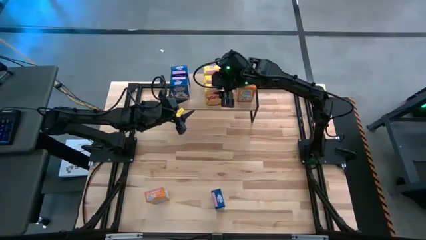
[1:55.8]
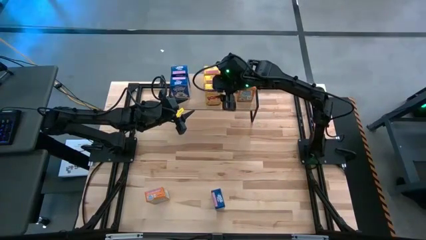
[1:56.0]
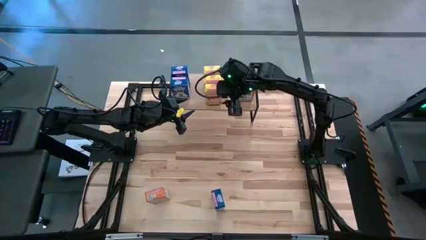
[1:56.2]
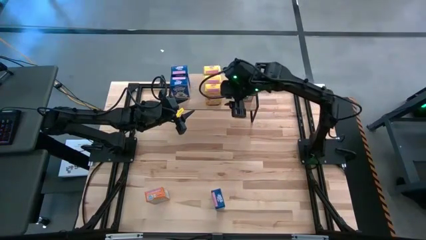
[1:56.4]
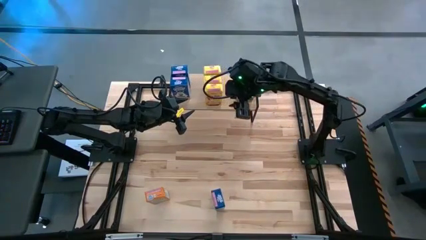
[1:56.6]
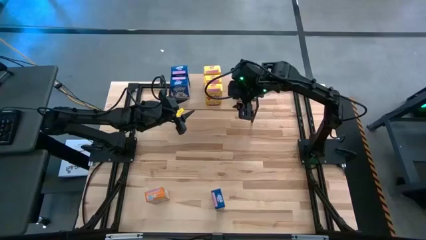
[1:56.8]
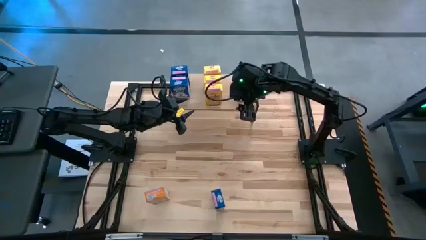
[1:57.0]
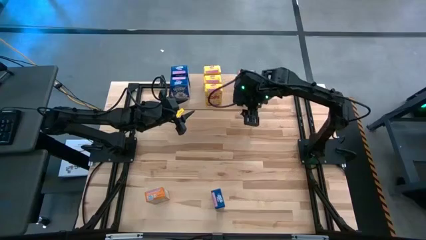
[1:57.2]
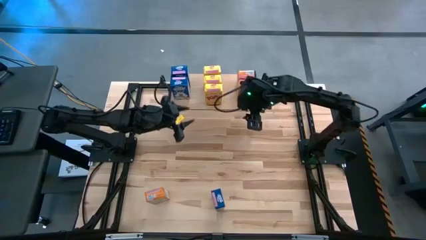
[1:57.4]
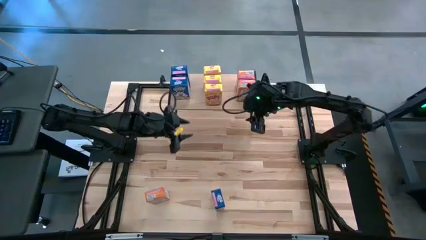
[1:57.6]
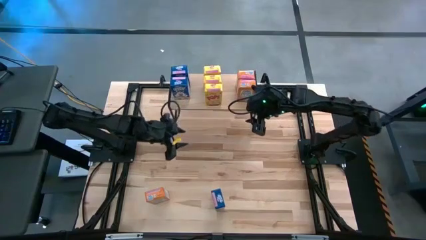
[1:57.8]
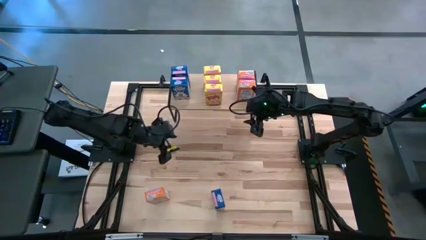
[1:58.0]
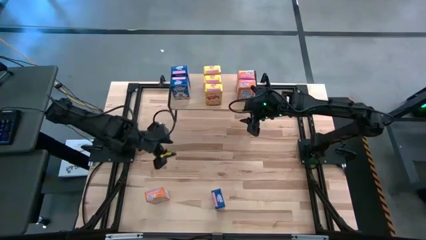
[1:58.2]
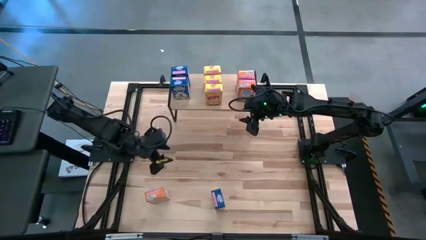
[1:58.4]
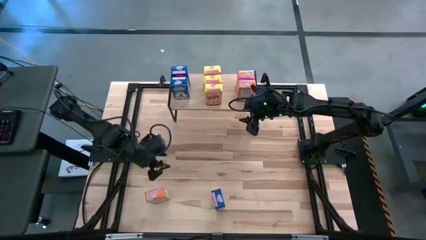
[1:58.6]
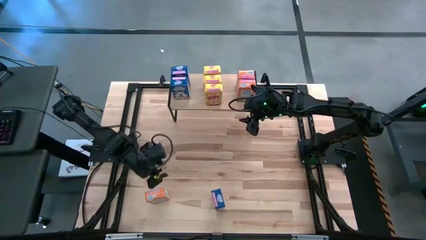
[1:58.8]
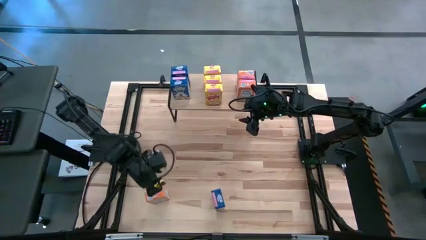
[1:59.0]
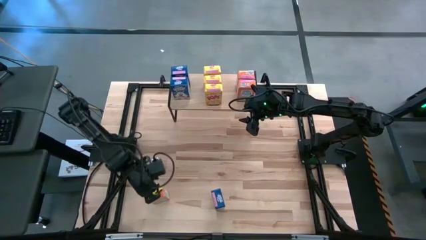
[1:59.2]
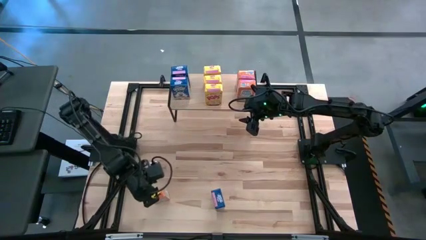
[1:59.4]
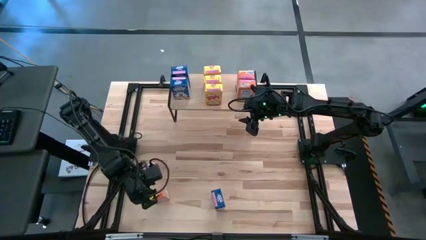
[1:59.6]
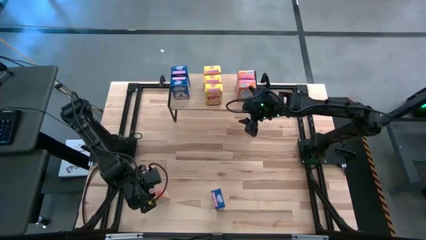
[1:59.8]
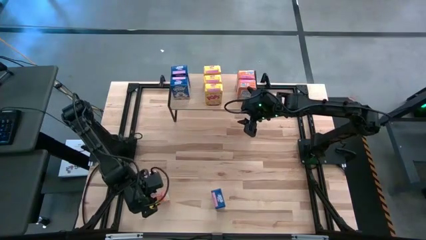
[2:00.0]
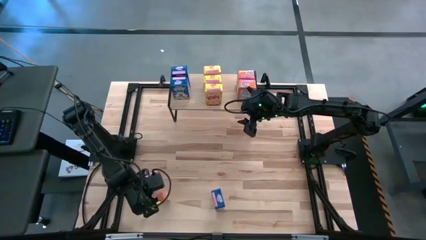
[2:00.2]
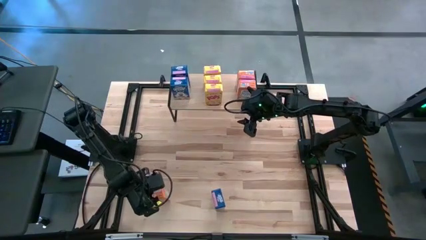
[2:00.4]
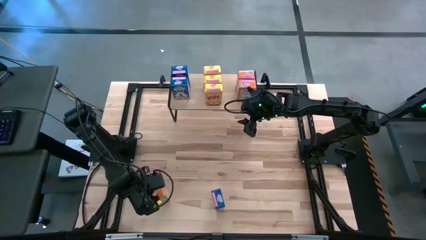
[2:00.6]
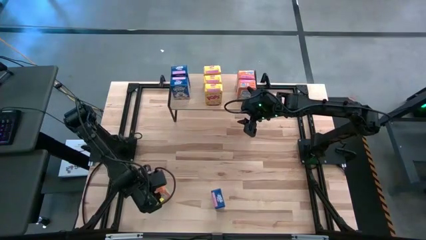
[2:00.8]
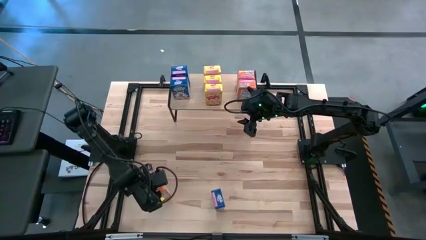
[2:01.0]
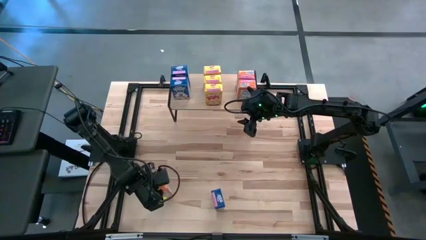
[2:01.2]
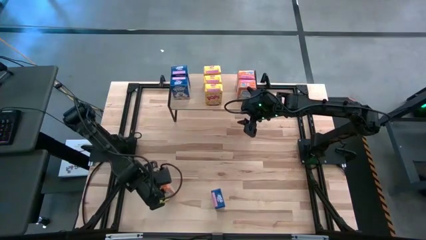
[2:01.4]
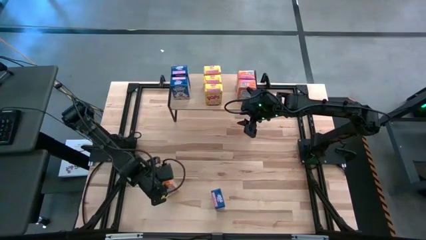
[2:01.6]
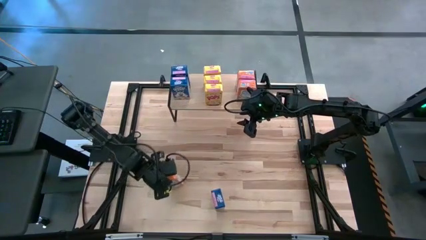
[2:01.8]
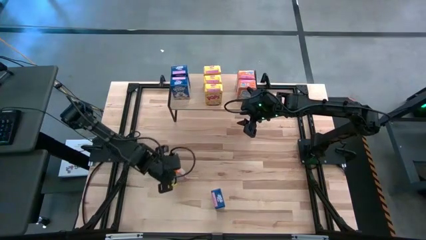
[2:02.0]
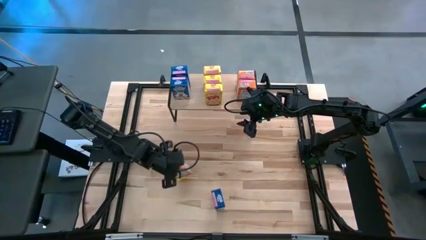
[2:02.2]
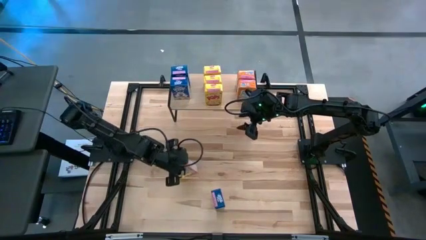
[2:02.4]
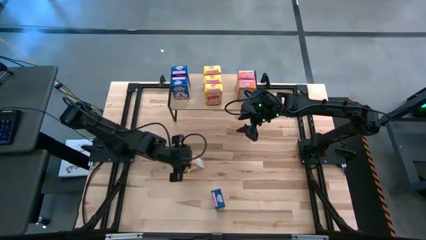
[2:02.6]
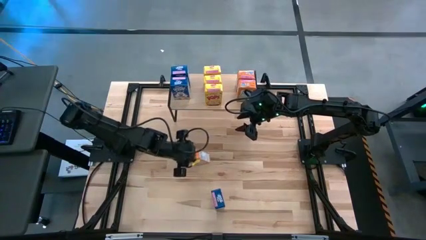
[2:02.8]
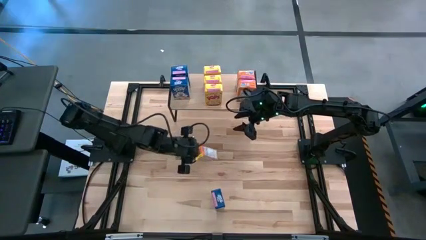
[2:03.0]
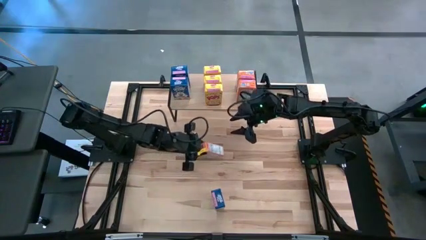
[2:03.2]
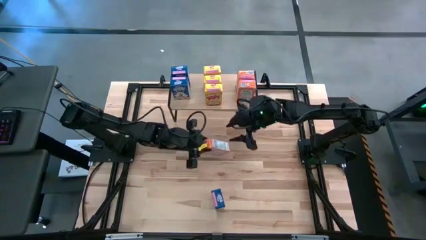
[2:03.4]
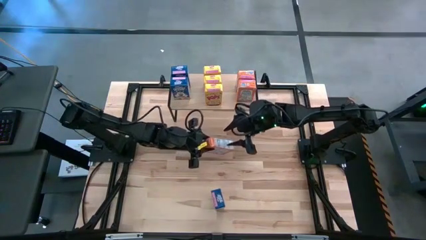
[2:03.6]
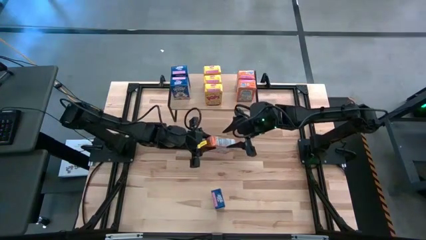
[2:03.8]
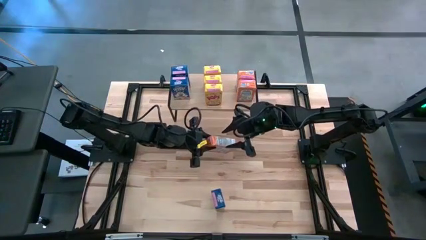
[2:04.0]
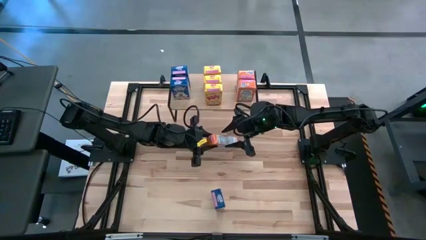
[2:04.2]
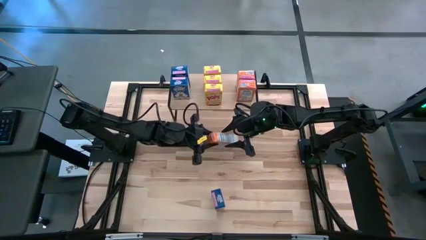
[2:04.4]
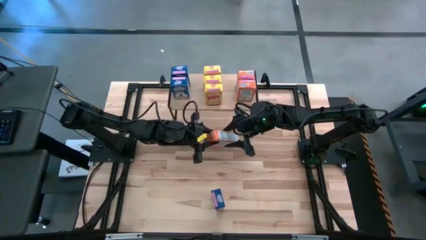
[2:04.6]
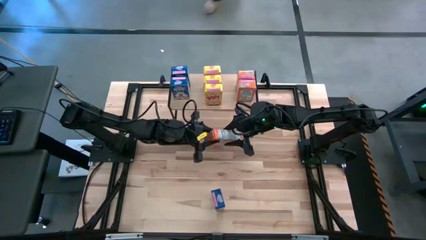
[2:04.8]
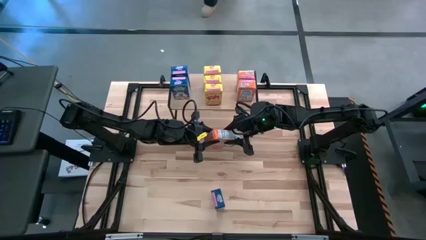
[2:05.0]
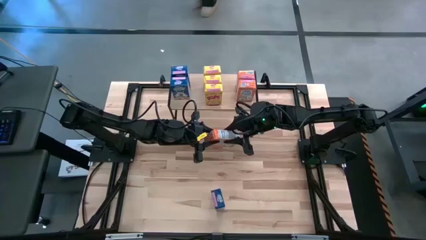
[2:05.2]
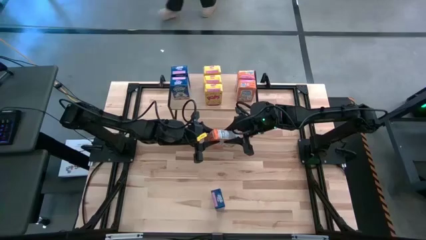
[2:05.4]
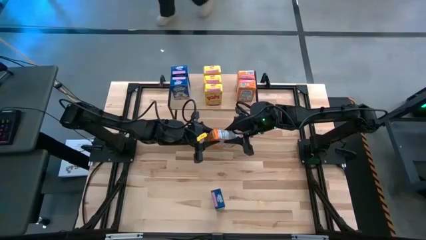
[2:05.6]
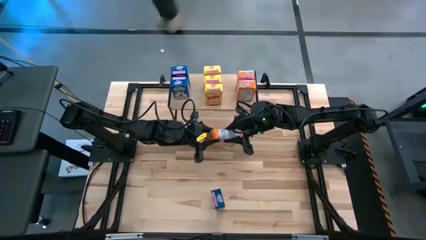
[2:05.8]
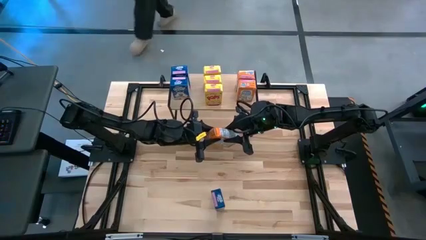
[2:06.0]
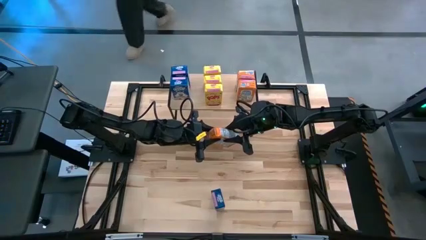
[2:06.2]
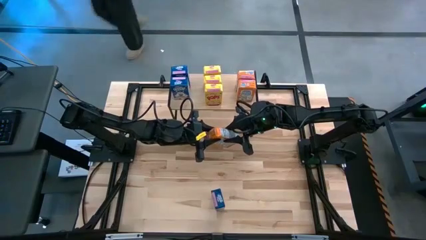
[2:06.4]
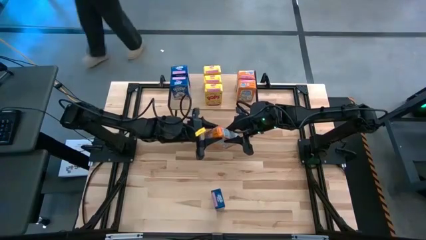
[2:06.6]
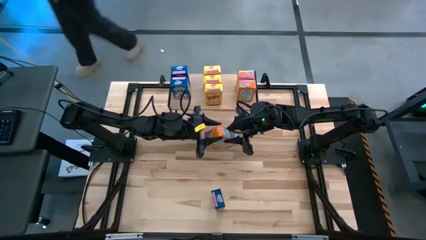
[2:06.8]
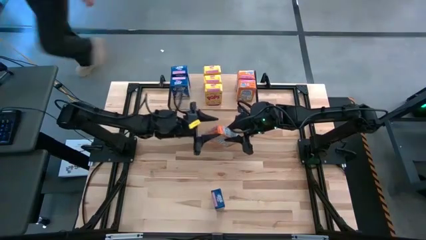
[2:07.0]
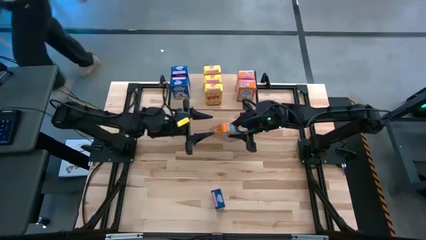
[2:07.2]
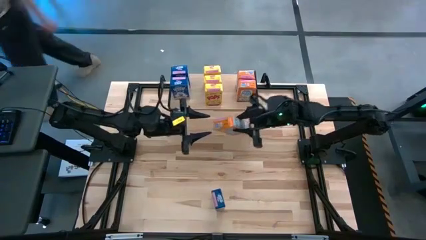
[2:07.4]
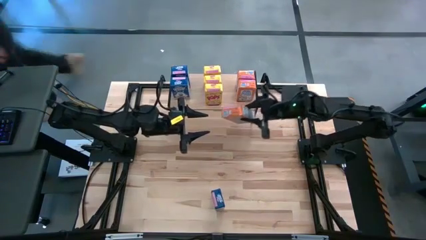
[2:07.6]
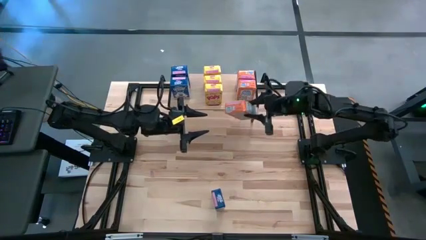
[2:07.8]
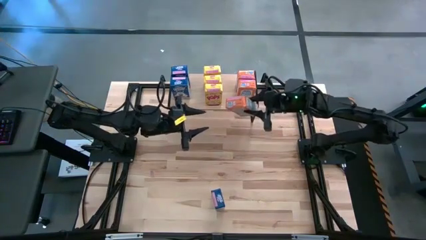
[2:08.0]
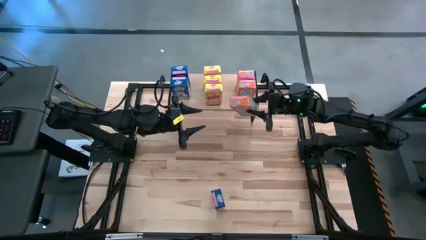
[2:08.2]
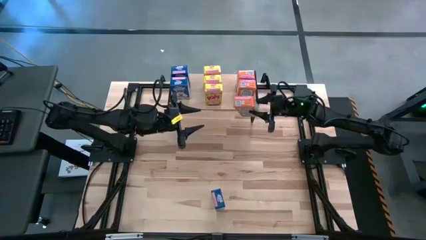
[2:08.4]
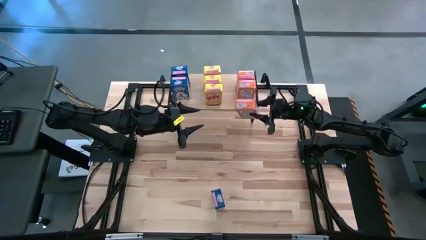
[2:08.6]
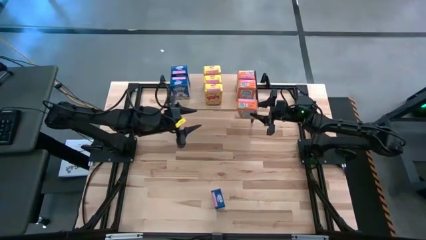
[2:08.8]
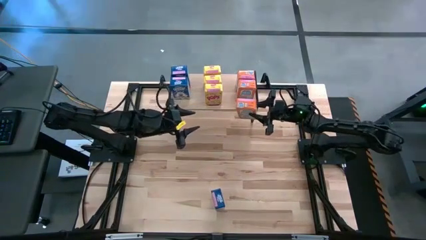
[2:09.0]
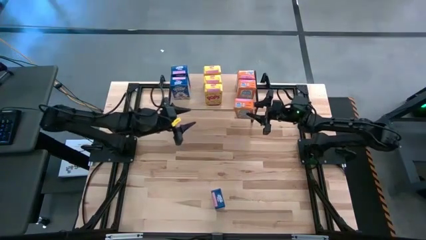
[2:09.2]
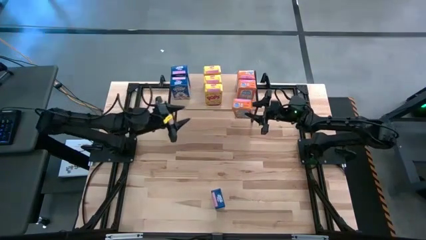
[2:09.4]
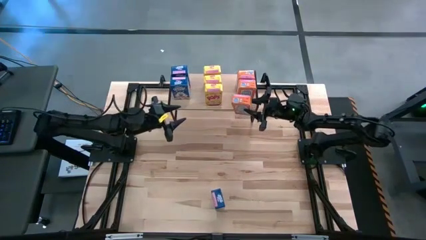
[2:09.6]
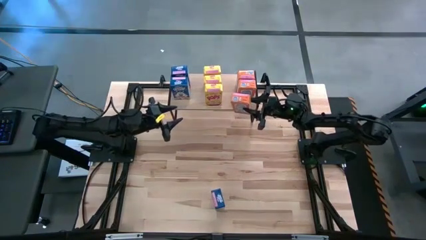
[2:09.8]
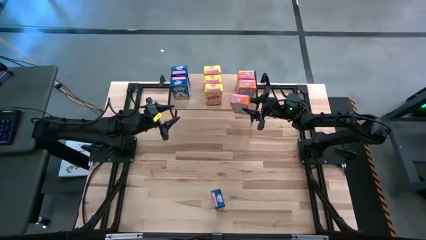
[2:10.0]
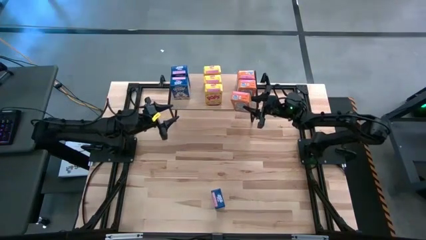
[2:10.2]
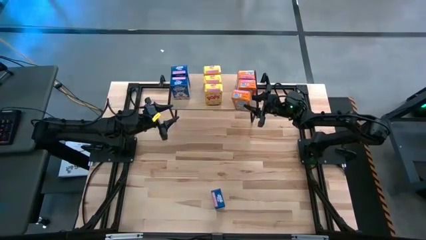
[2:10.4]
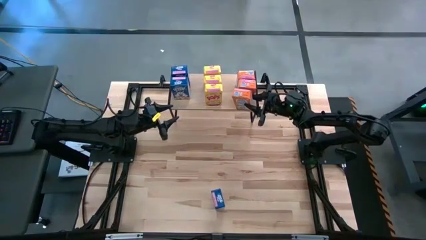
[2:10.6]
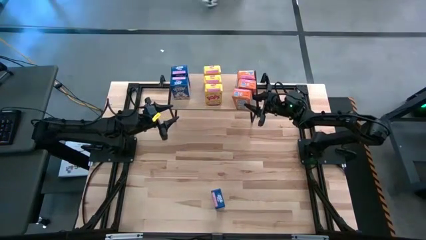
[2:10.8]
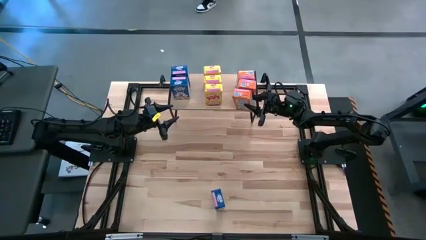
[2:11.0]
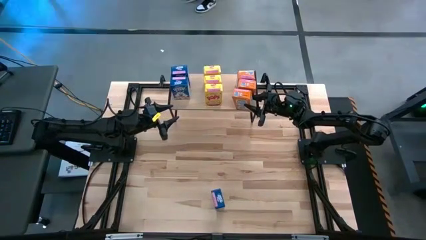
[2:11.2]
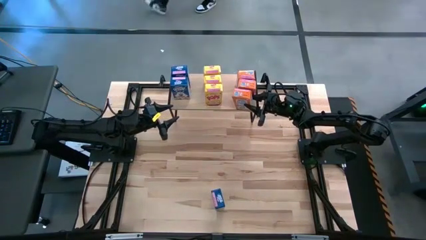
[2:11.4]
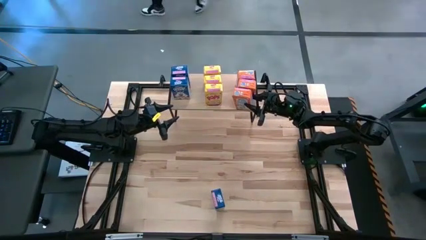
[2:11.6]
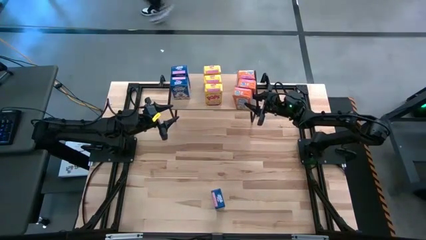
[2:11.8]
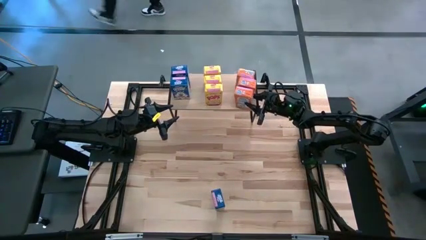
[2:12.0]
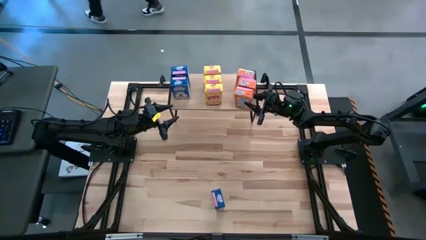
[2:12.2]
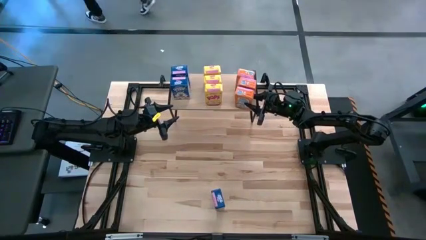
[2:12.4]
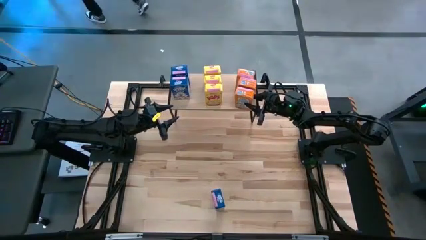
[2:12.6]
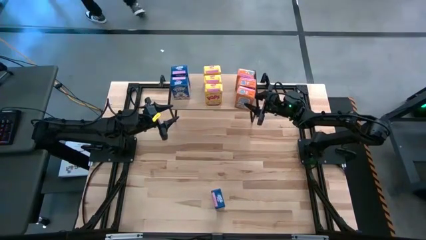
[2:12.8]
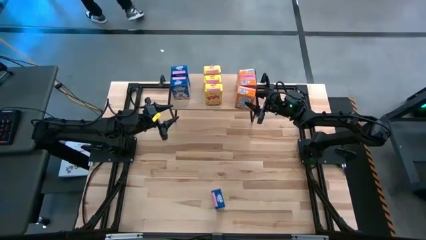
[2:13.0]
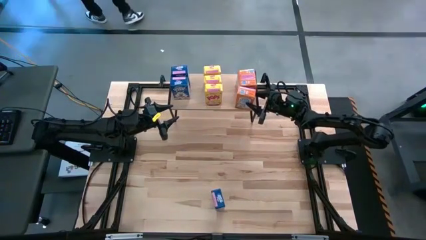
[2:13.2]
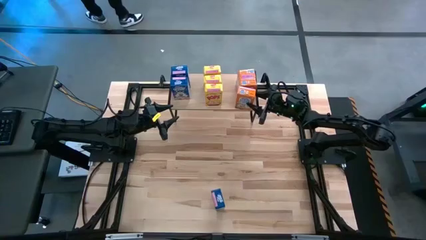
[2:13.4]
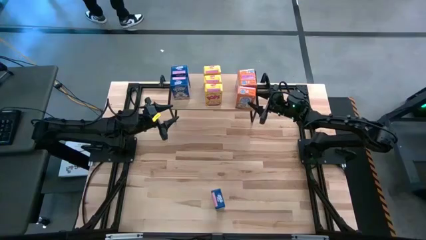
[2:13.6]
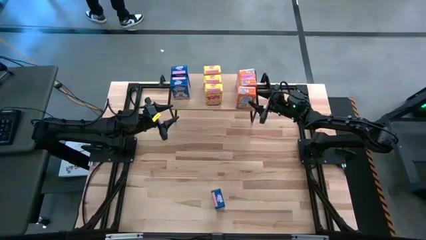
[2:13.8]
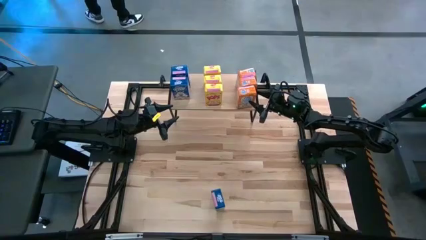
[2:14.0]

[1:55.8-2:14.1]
Task: Stack cereal on shelf
Put the orange cereal box on the shelf
